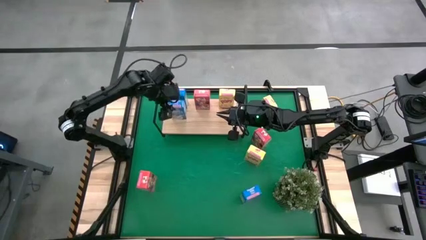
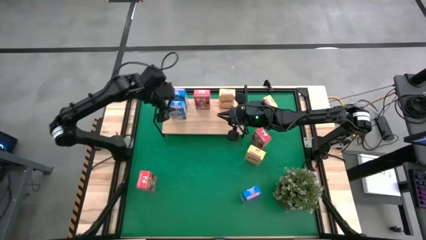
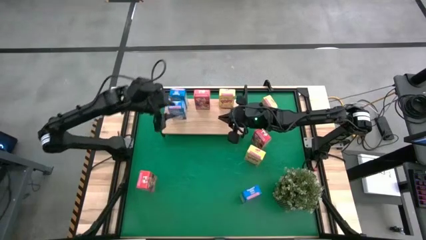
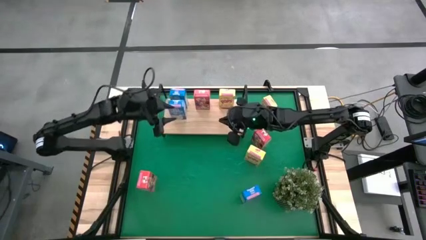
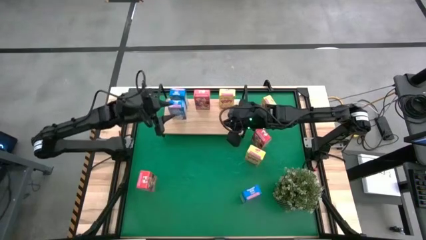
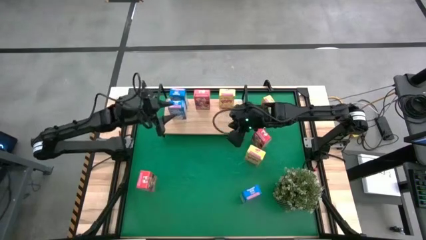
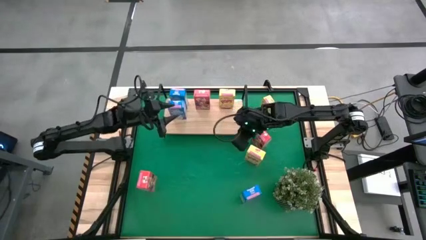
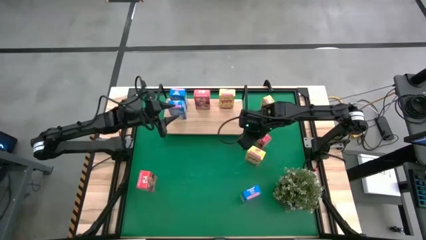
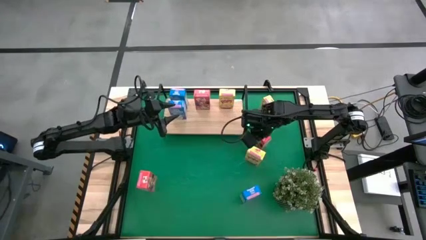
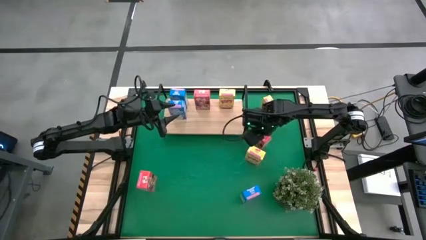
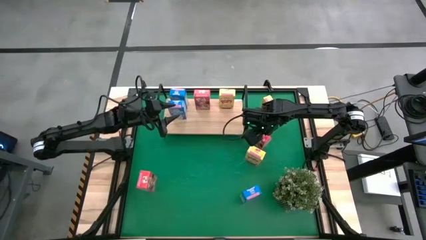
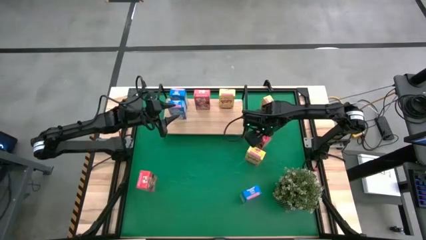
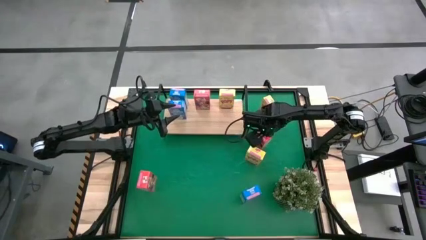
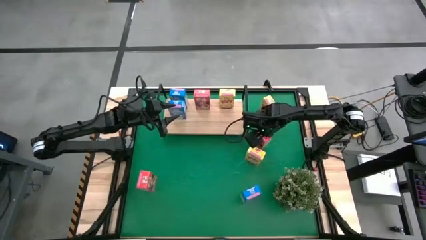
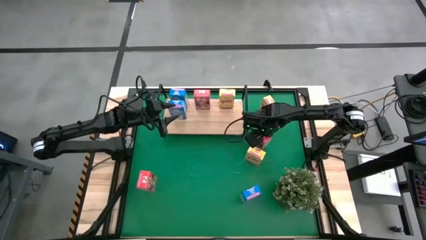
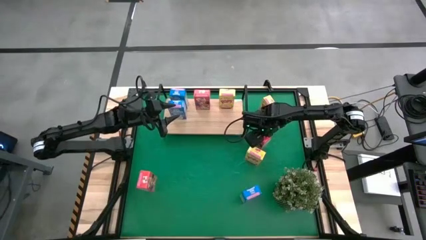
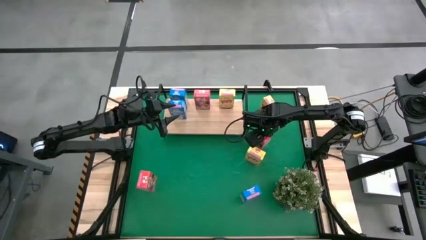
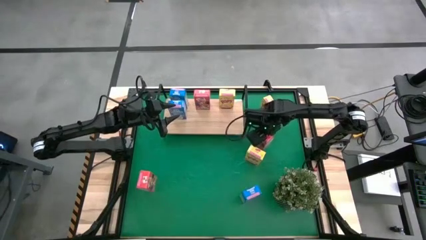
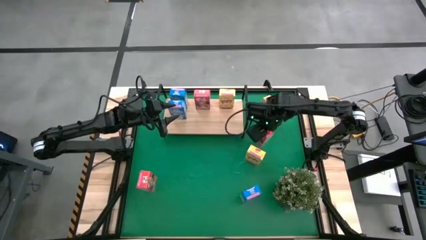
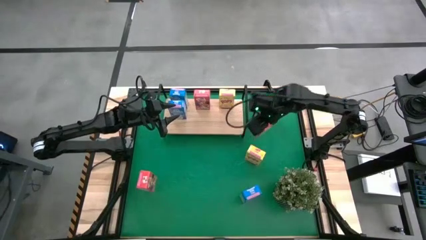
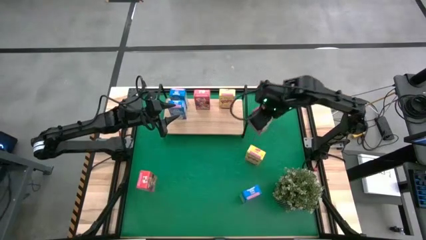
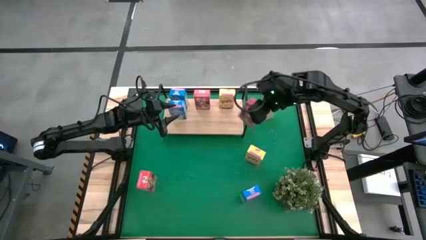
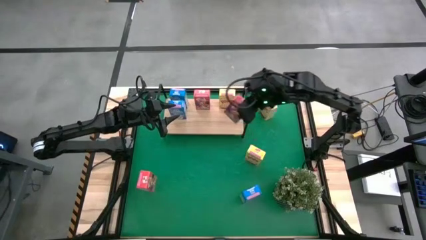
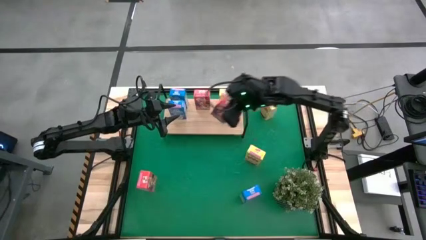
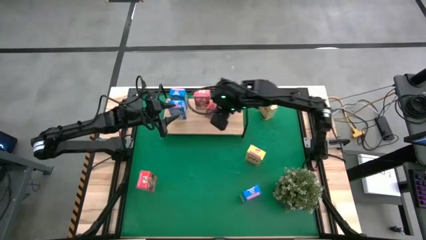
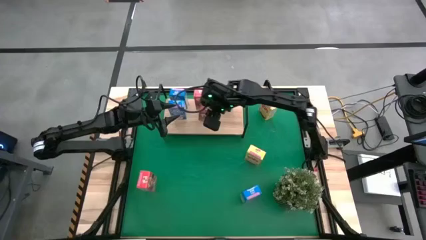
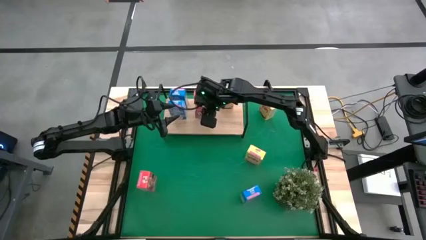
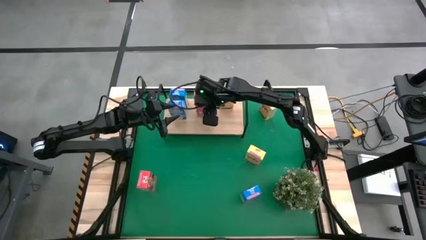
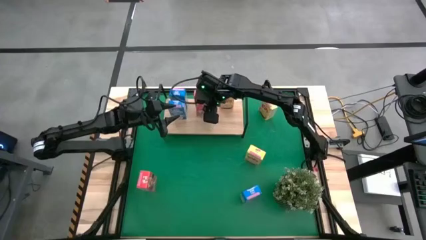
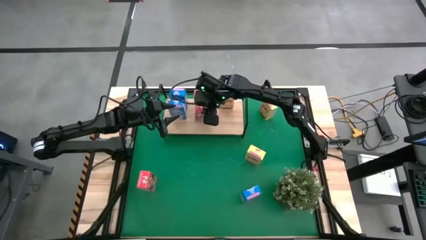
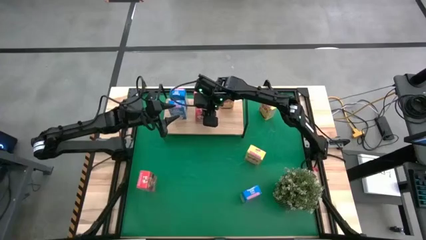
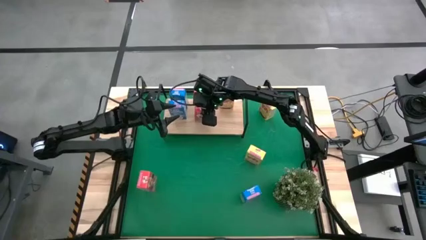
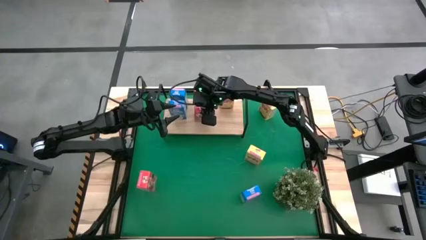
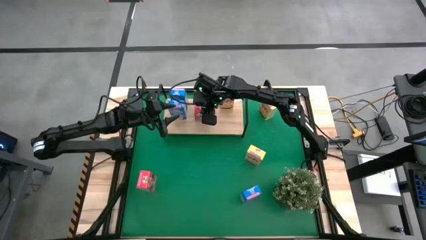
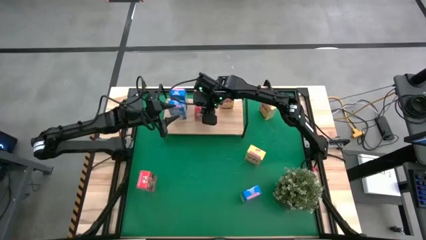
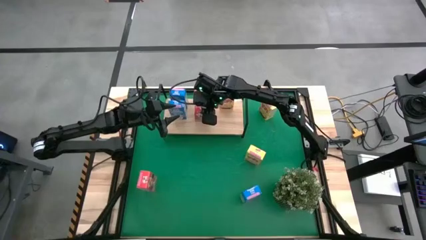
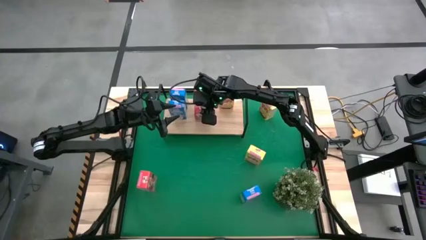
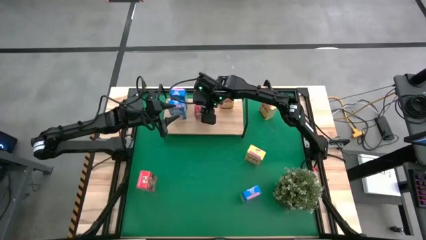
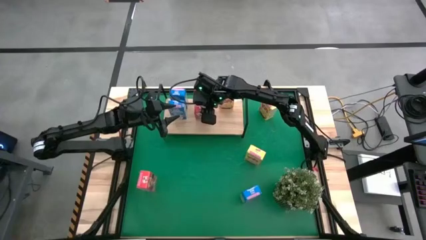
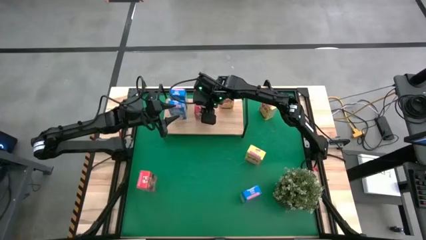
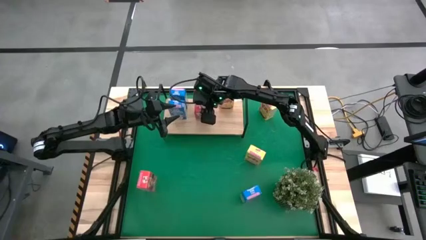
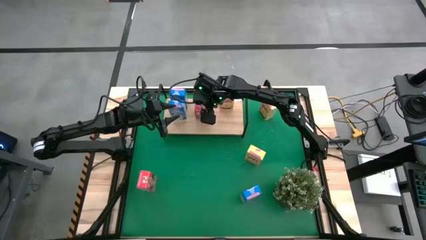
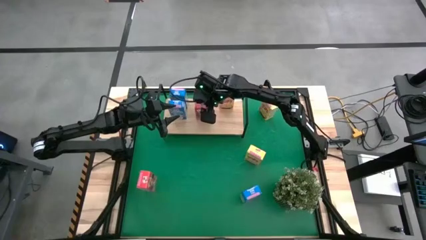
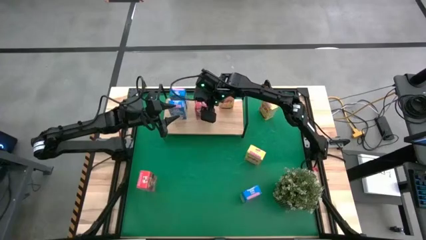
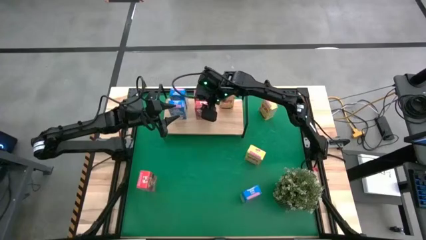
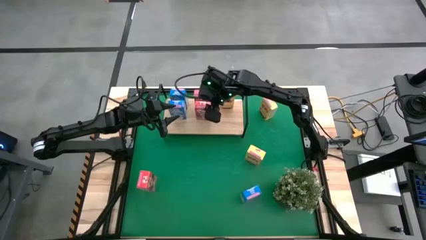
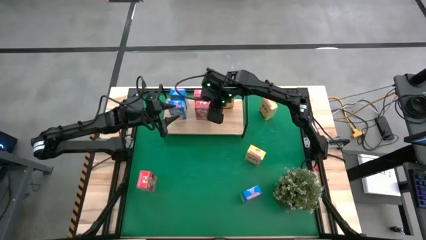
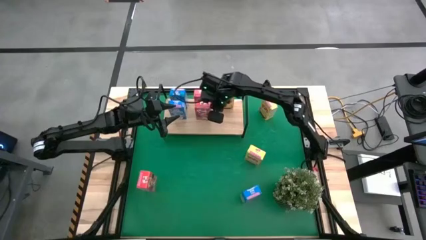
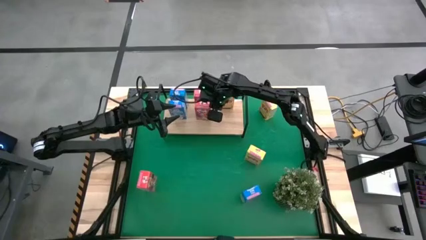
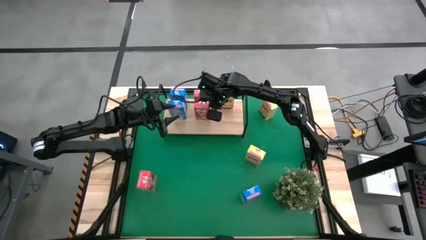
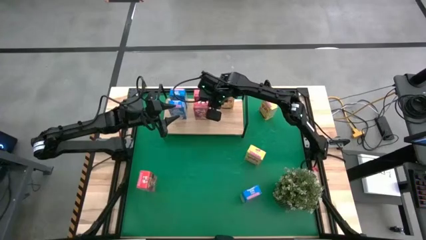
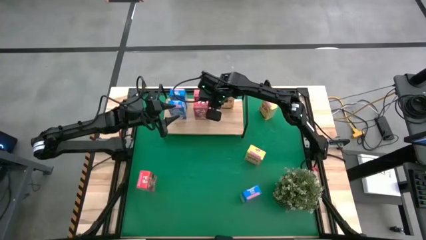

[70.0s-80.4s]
Task: Stack cereal on shelf
Put the top red cereal box on the shelf aligned with the other red cereal box

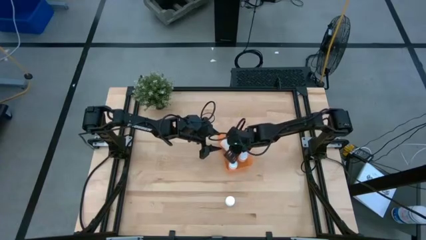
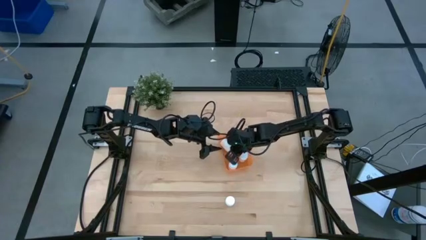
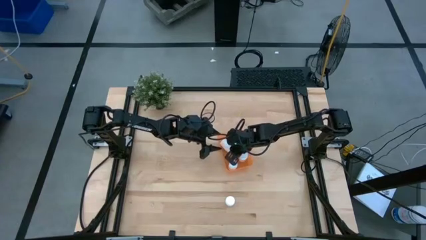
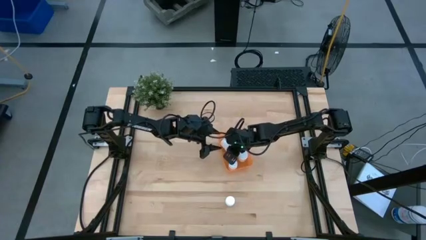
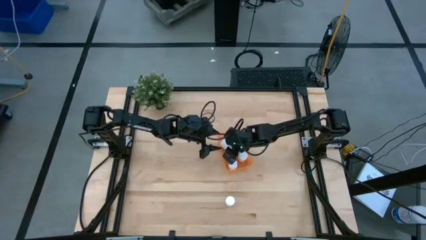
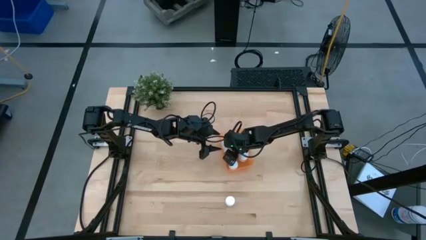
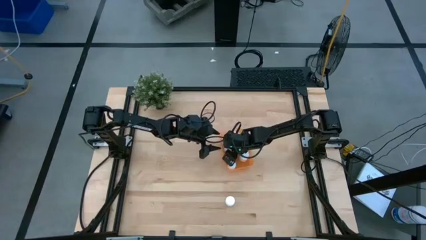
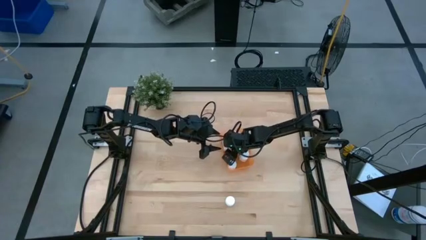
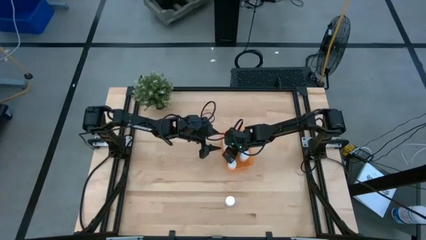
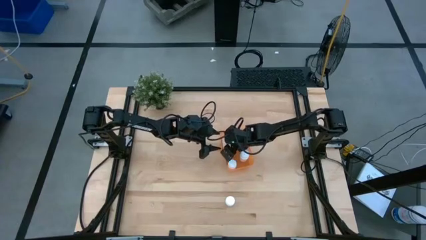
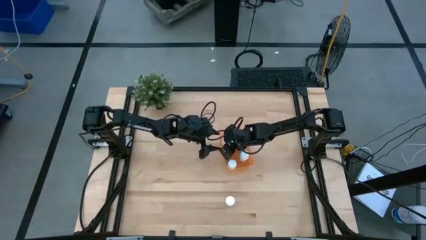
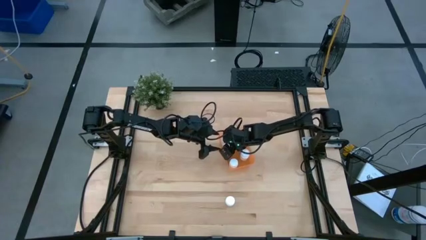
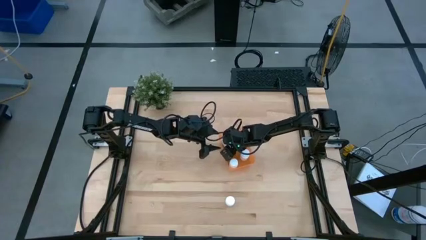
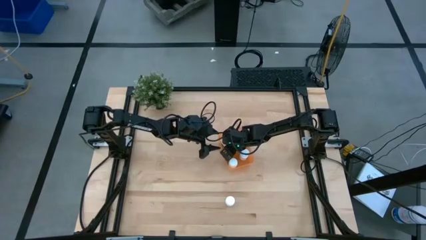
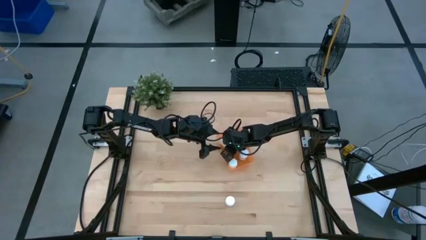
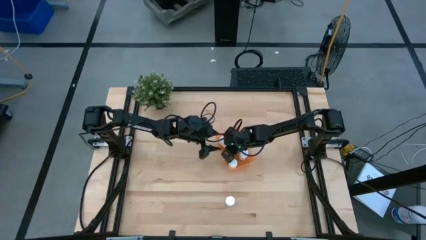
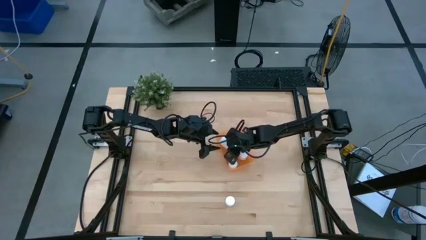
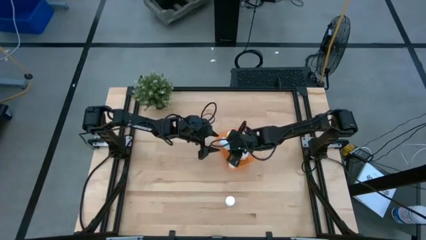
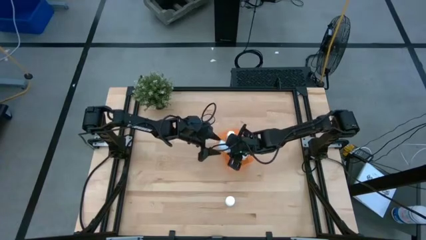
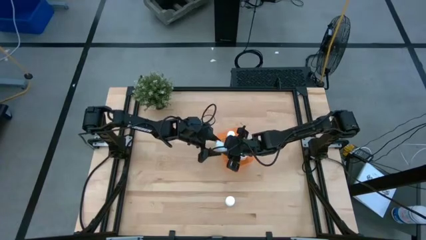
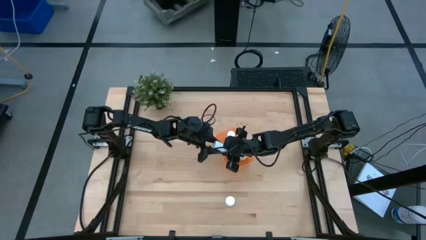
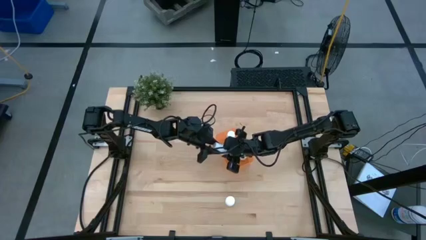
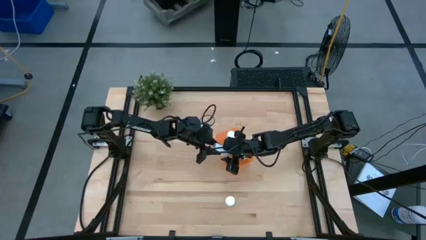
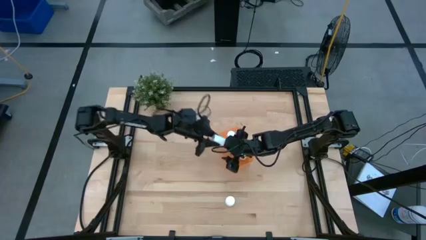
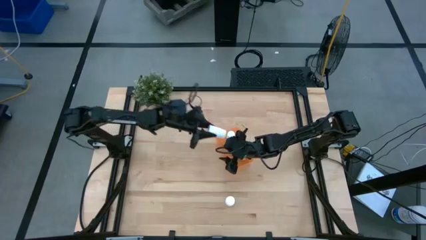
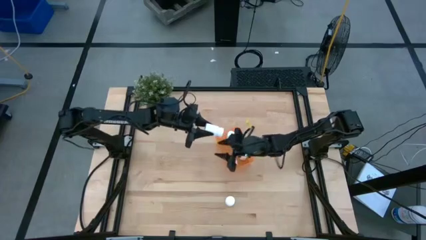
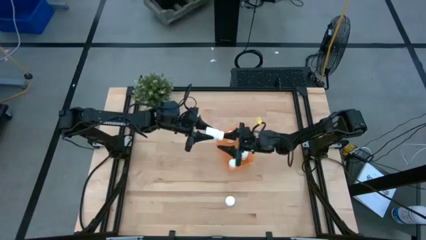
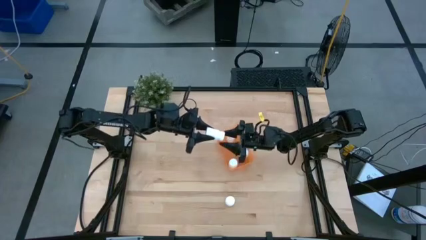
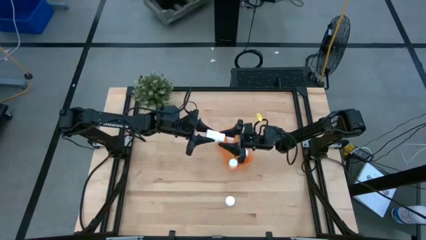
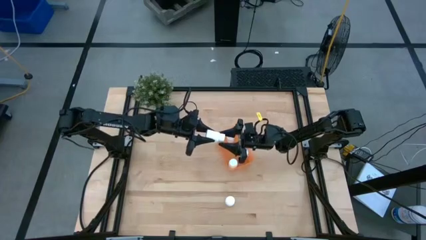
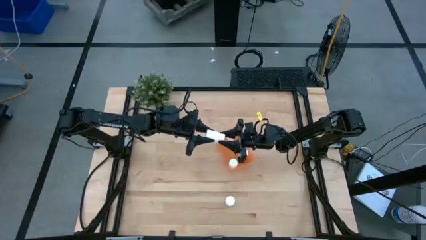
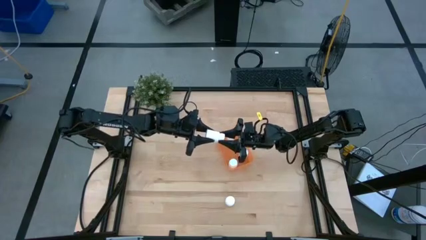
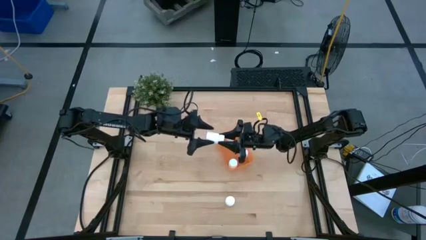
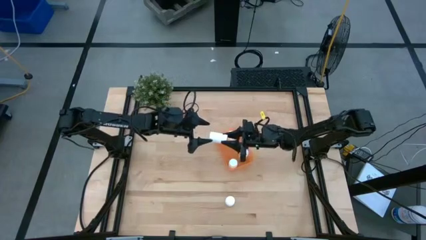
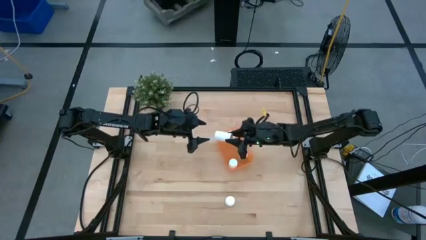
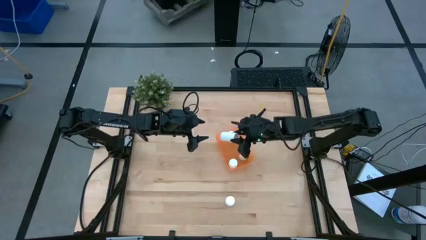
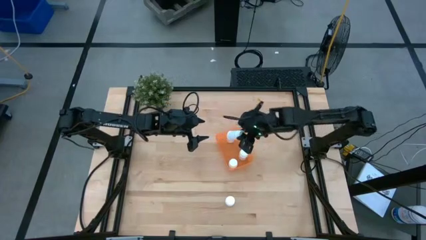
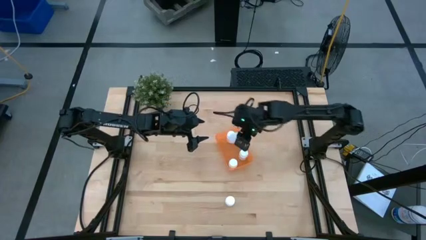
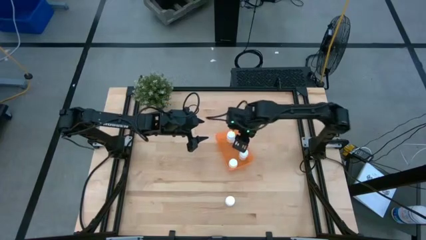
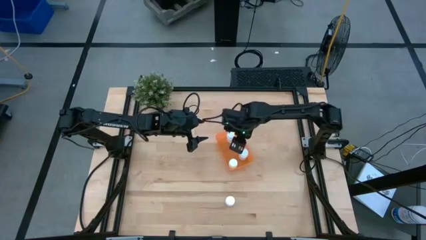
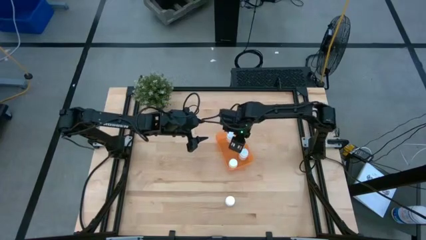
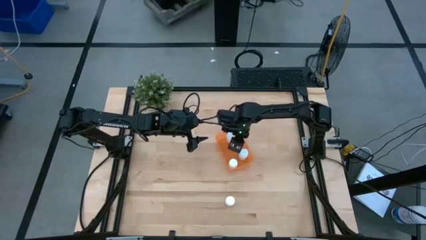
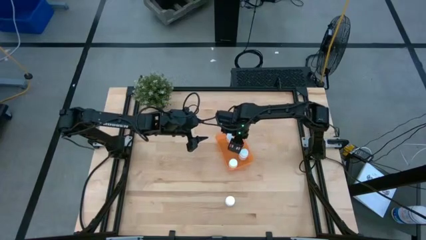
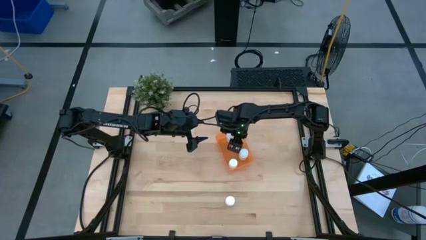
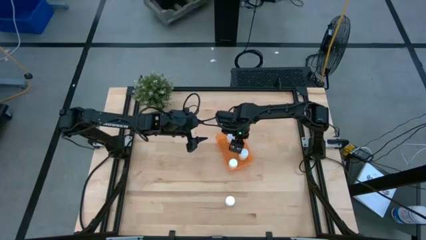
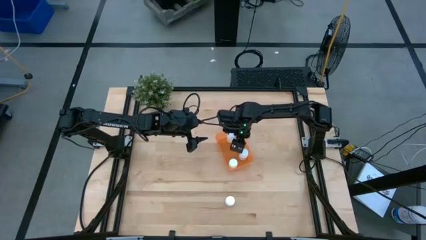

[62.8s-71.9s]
Task: Pick and place pill bottles into a basket
Adjust the white medicine bottle in the orange bin
